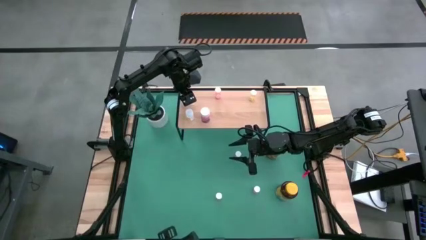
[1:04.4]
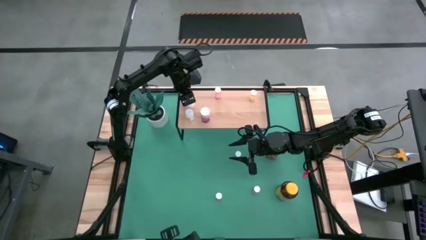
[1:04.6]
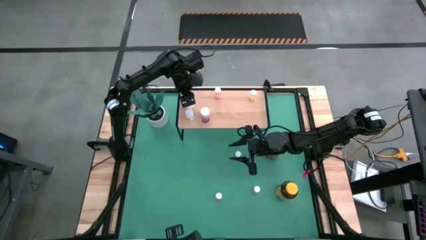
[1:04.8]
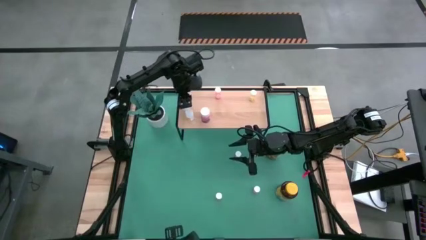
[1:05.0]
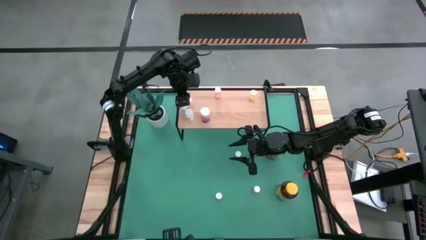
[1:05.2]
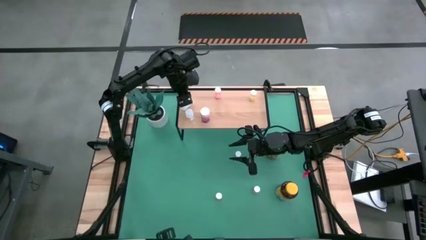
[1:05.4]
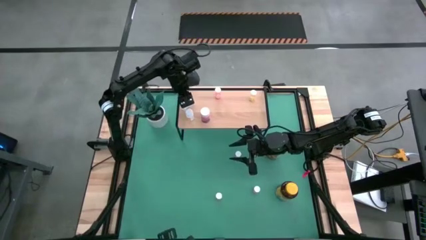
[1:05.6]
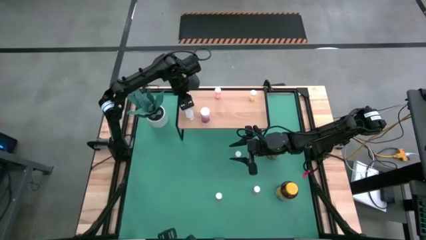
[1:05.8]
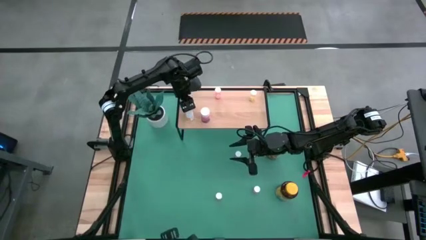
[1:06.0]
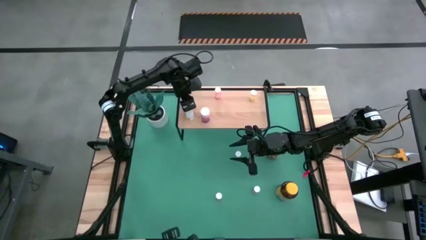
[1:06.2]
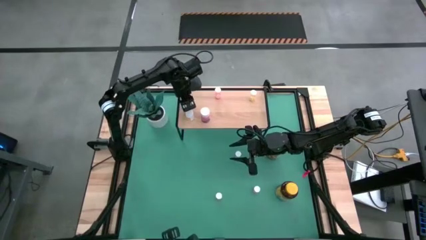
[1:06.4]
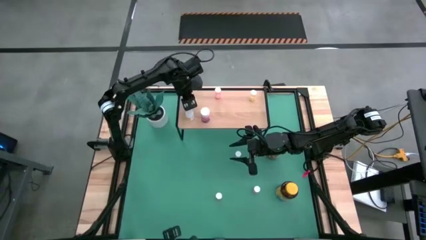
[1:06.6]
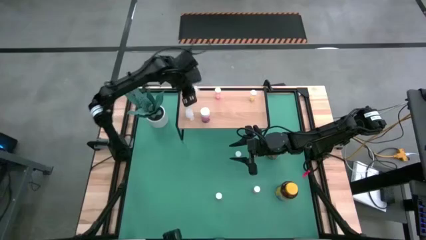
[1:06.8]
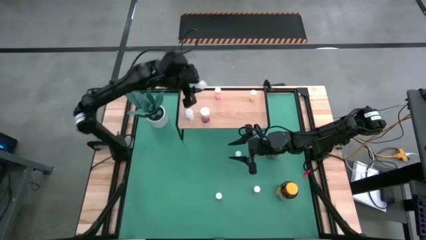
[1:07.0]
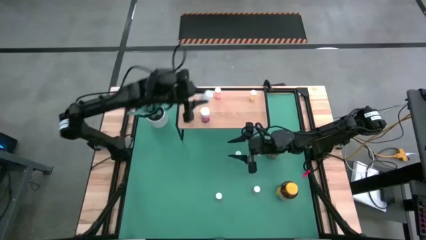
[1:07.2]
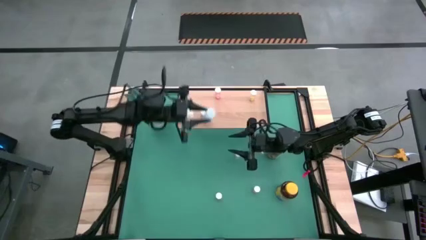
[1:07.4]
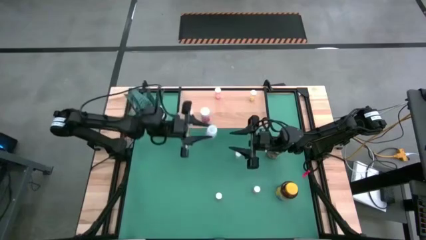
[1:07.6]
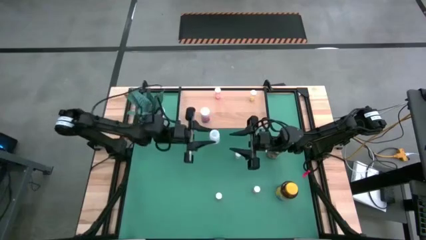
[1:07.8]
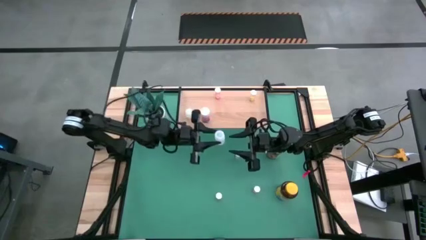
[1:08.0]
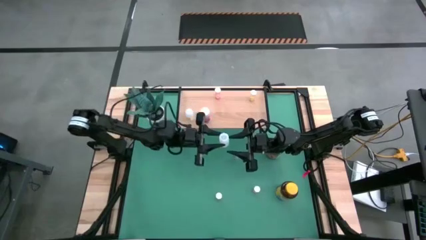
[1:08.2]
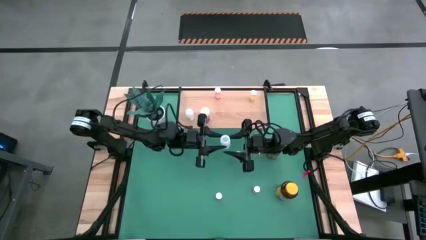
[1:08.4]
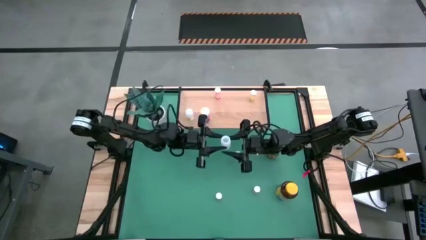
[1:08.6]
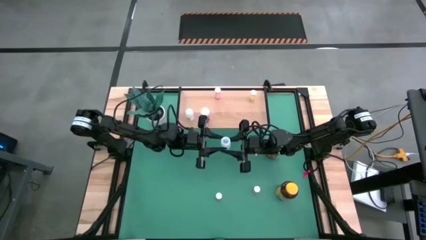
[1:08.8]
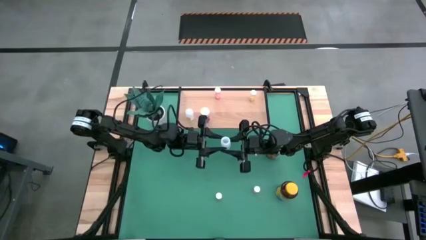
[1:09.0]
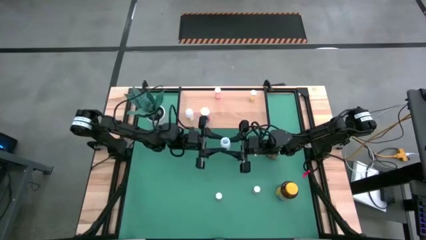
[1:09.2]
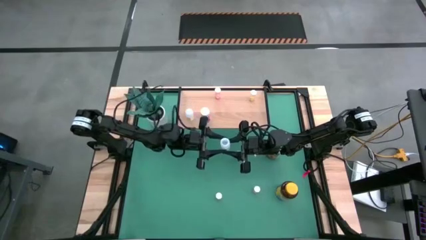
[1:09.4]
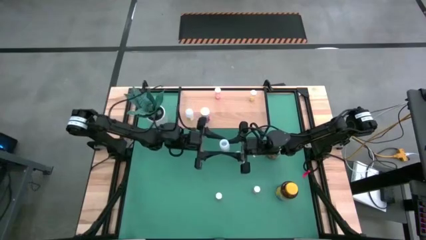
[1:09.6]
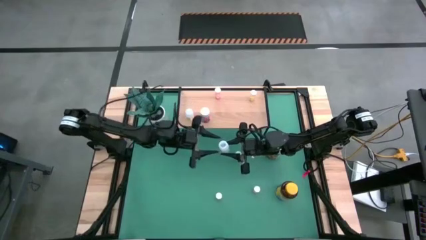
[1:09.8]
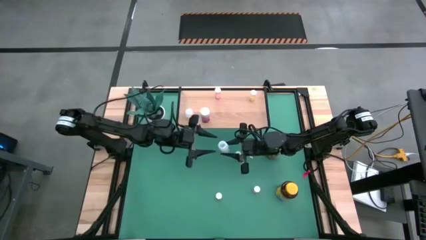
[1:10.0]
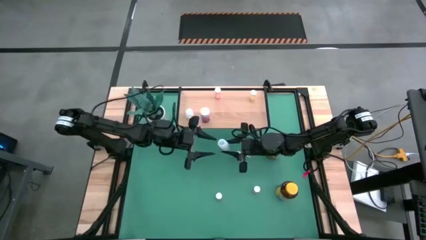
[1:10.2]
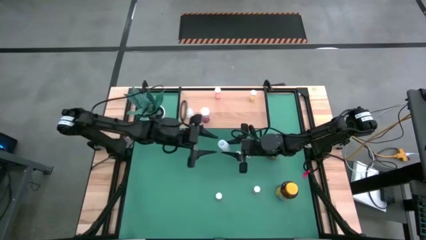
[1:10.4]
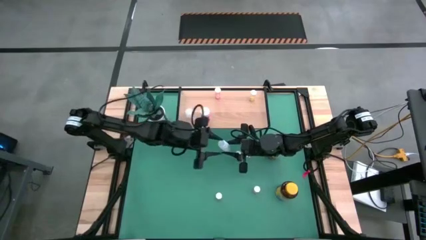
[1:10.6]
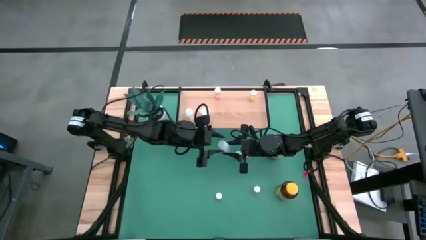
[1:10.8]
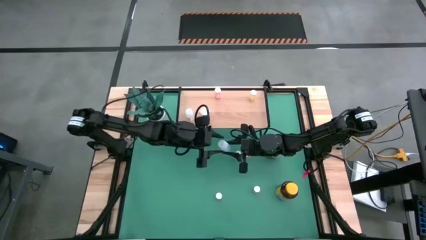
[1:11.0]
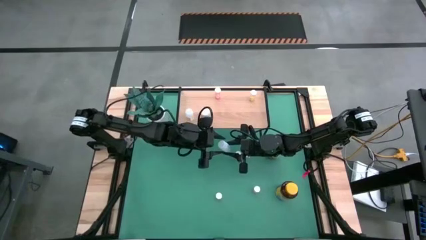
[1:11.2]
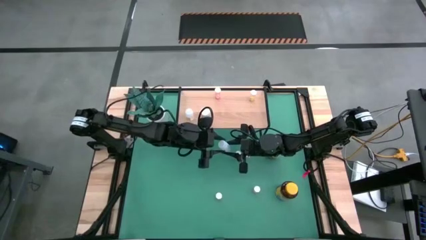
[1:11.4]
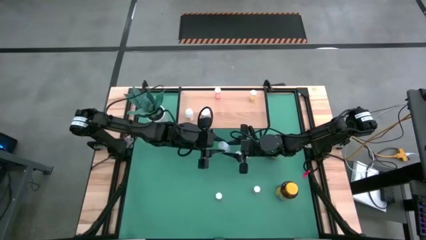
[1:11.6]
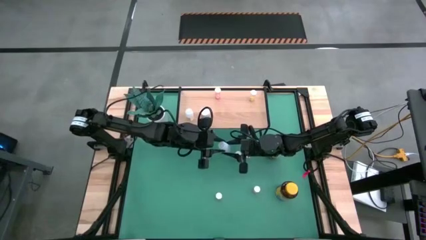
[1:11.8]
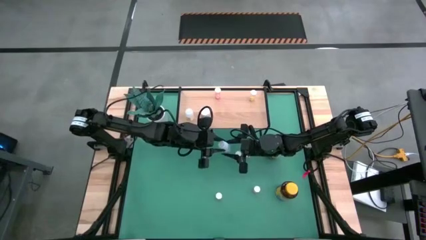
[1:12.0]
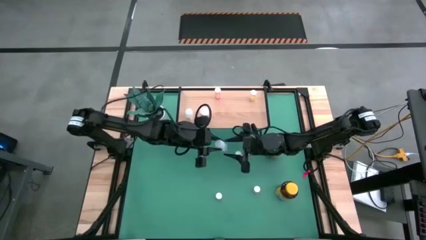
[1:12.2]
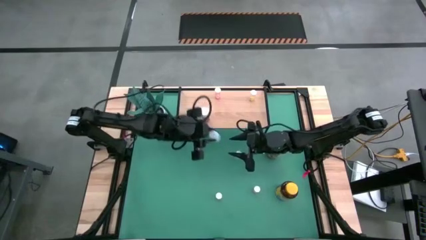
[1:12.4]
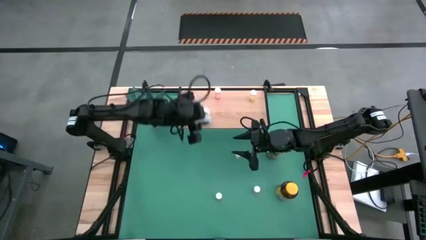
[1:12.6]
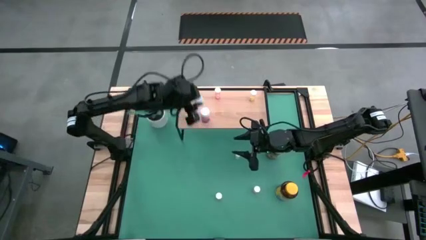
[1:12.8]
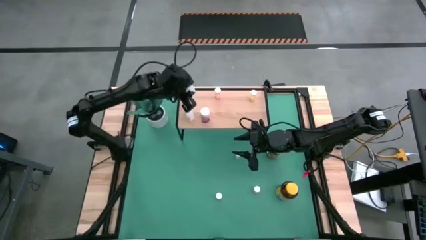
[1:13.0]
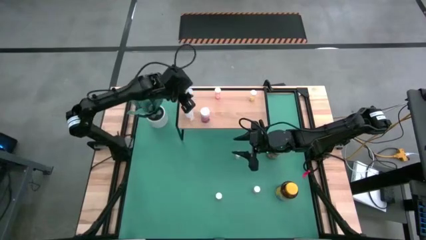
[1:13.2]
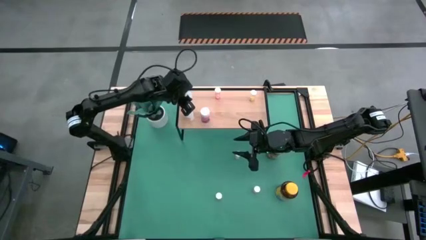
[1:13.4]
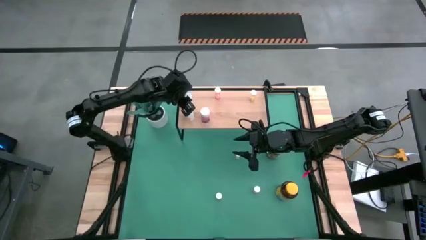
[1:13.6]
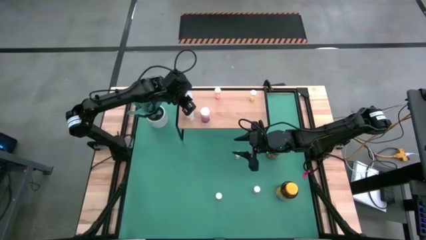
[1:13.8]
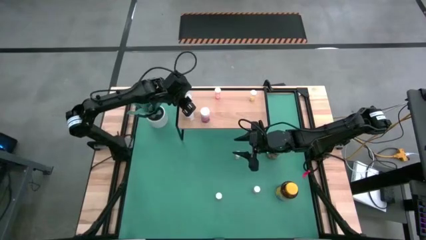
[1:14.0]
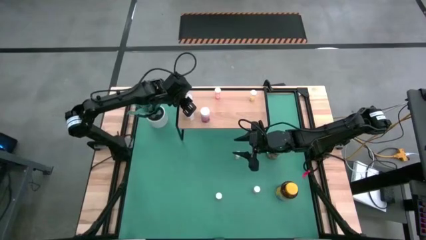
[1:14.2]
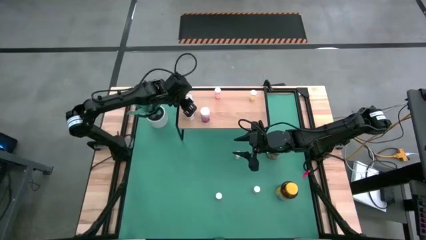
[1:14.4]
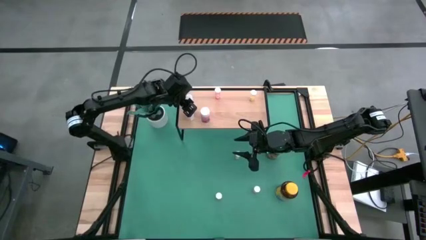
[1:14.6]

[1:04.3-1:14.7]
Task: Pick and place medicine bottles onto shelf by color
Put the white pill bottle on the shelf

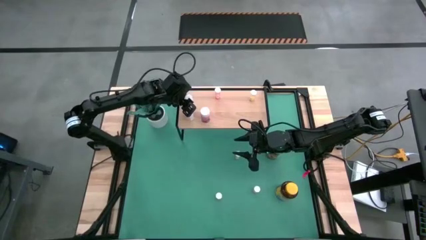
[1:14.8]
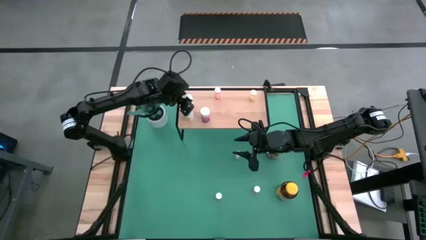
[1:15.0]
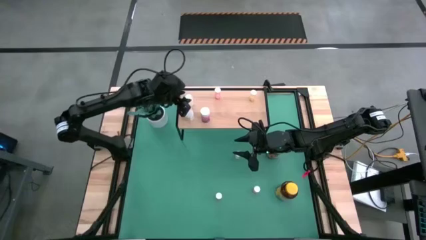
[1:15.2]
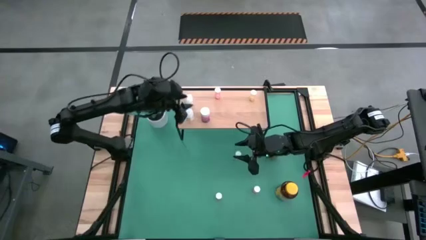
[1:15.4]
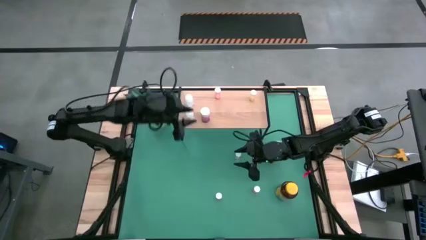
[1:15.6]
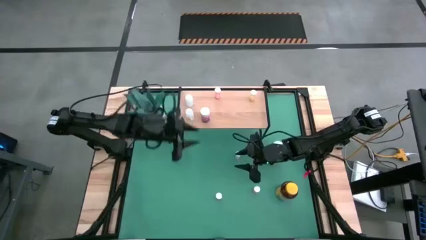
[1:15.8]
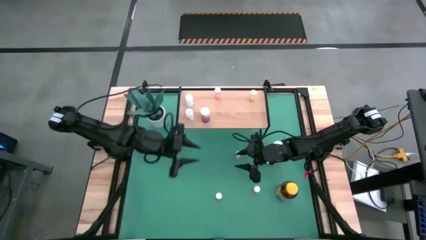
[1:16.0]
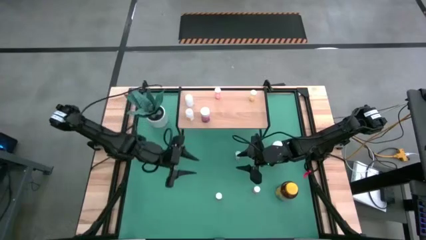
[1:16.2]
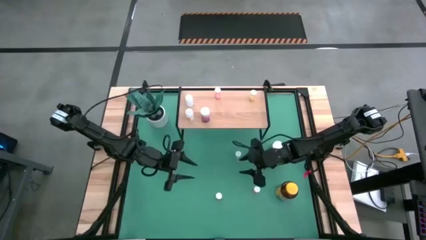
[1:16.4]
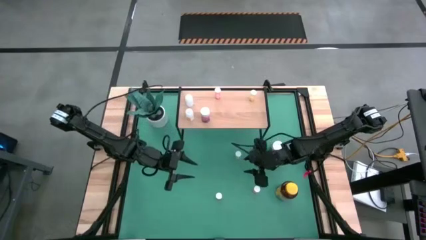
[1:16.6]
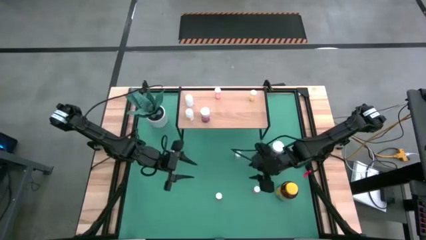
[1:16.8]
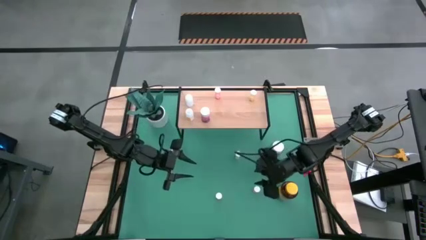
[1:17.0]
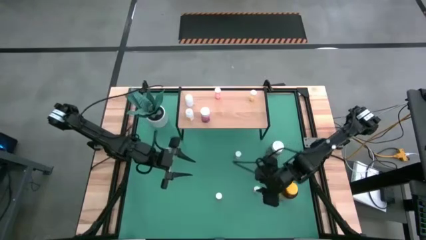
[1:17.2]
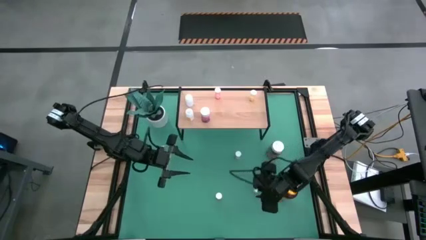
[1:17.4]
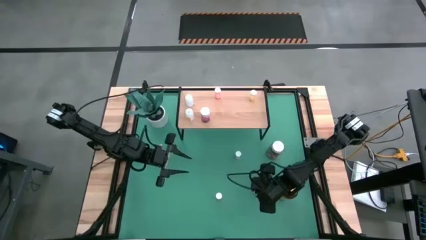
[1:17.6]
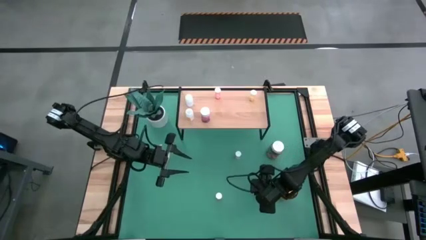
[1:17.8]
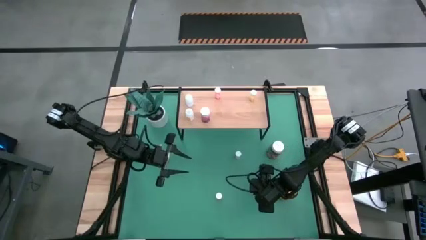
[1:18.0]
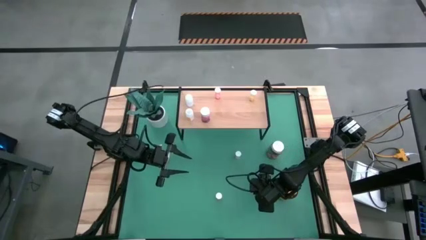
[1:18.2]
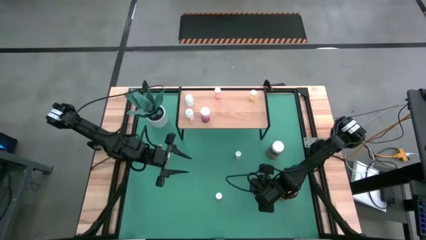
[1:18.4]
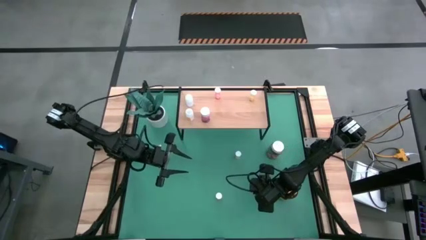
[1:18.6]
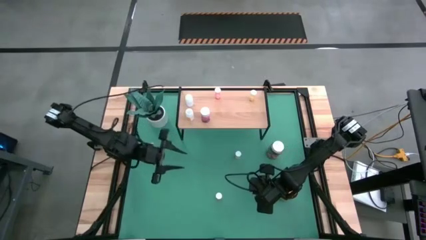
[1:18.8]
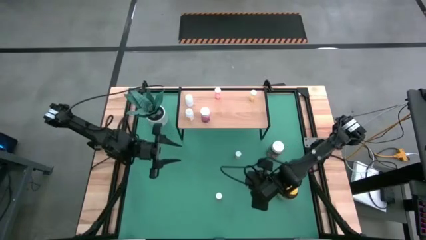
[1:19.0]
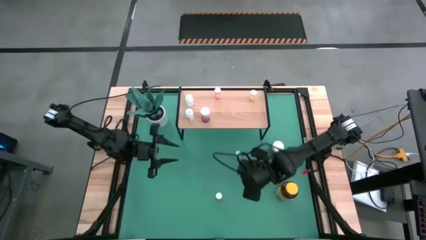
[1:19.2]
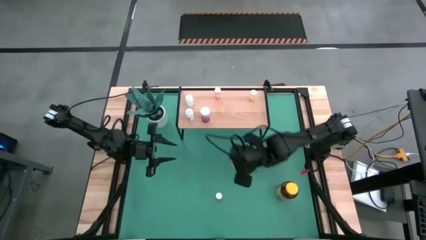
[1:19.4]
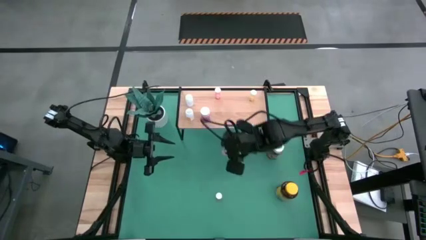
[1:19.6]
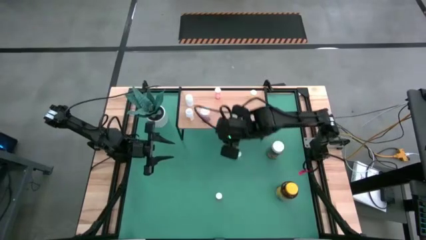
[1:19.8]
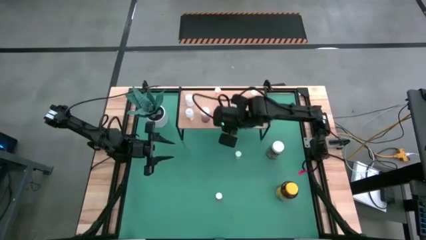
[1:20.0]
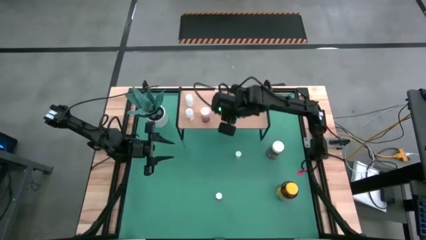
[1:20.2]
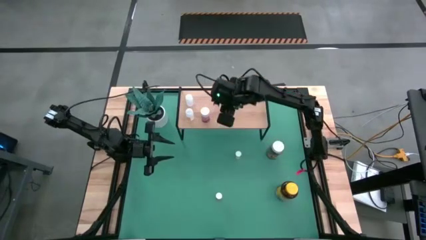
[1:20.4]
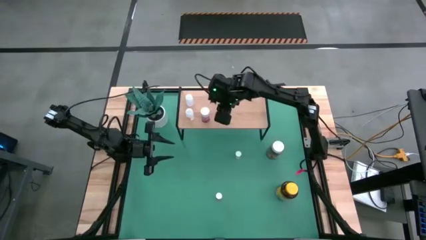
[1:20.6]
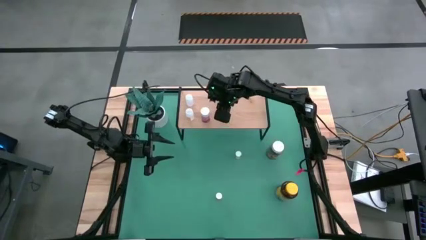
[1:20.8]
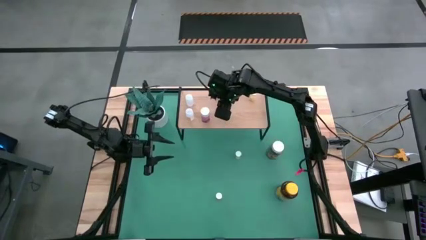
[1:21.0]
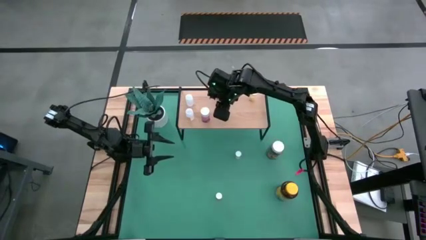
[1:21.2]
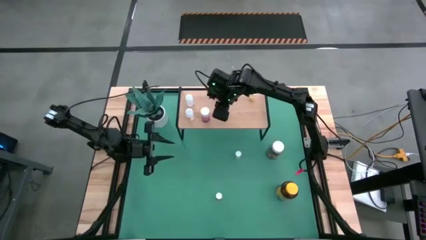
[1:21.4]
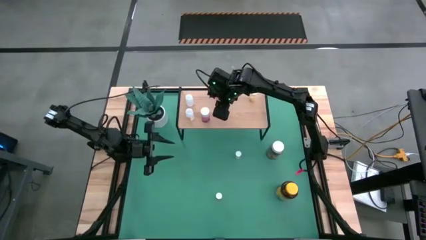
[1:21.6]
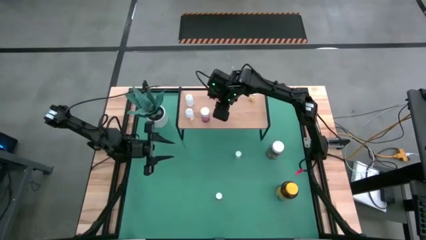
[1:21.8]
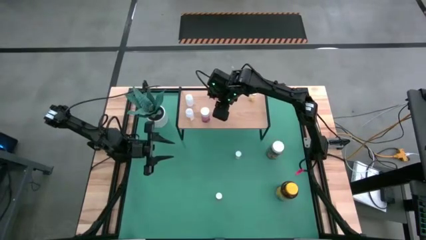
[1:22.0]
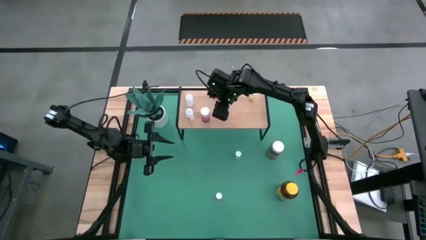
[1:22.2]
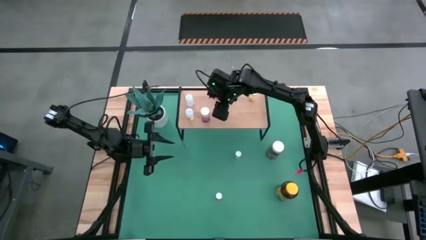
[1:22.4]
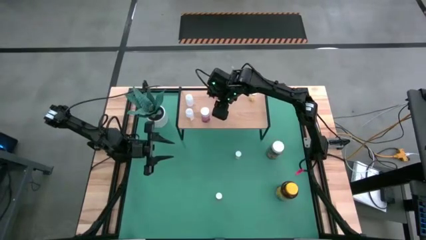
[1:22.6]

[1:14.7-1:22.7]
Put the pink pill bottle on the shelf aligned with the other pink pill bottle
